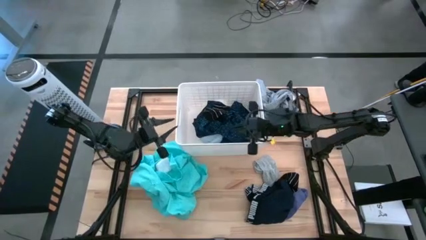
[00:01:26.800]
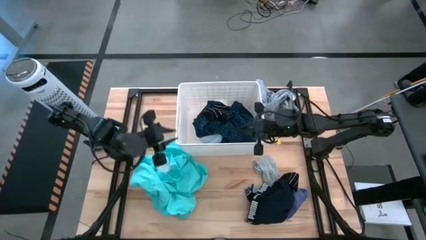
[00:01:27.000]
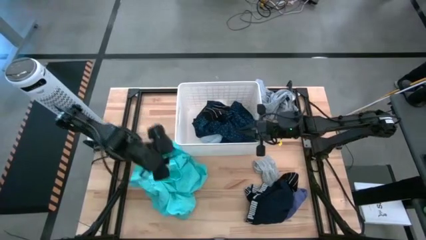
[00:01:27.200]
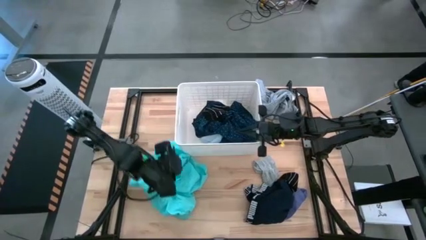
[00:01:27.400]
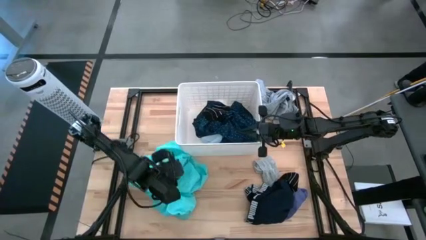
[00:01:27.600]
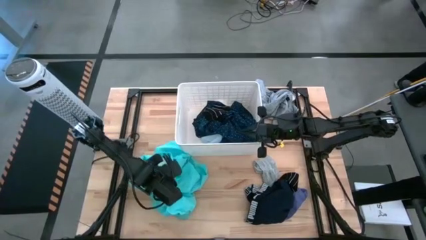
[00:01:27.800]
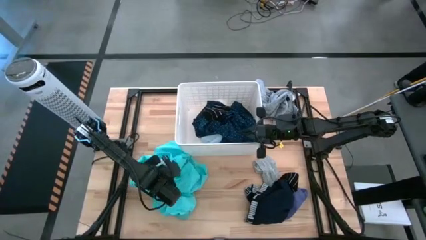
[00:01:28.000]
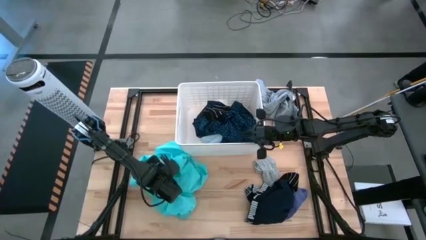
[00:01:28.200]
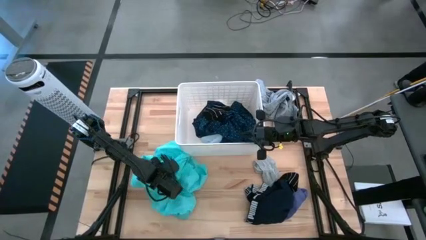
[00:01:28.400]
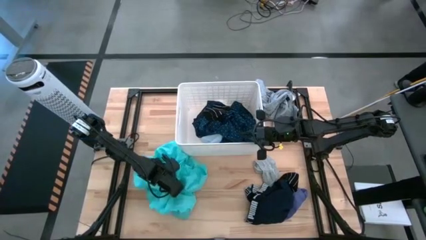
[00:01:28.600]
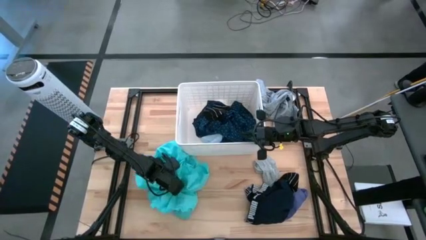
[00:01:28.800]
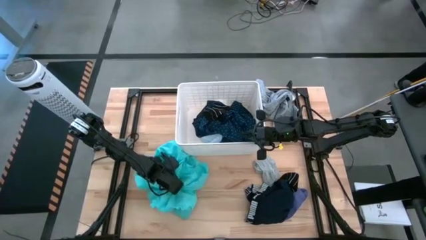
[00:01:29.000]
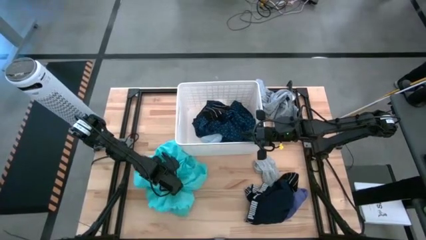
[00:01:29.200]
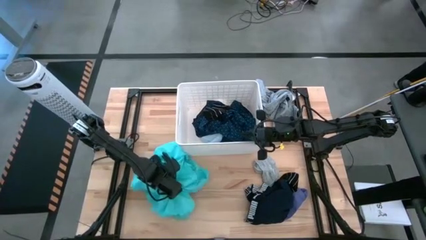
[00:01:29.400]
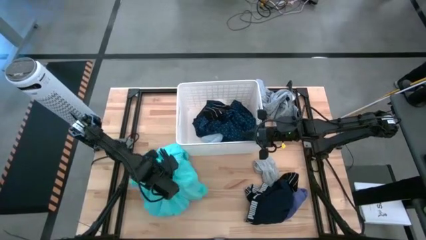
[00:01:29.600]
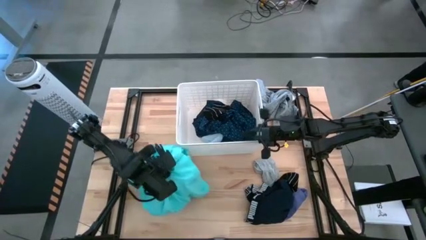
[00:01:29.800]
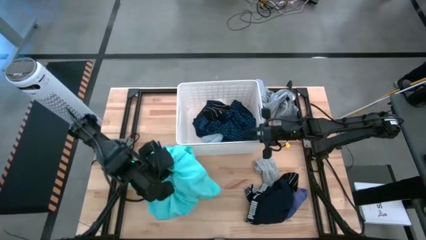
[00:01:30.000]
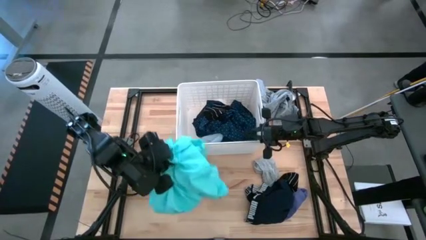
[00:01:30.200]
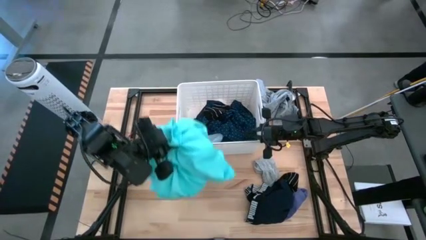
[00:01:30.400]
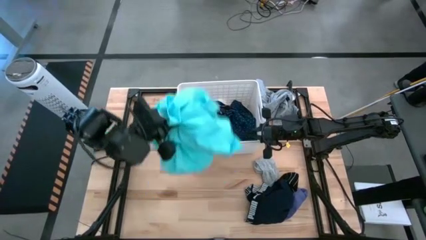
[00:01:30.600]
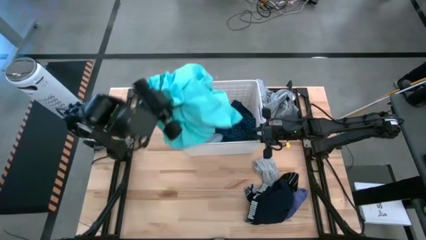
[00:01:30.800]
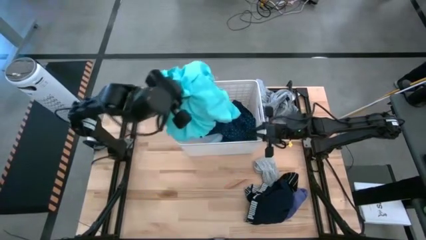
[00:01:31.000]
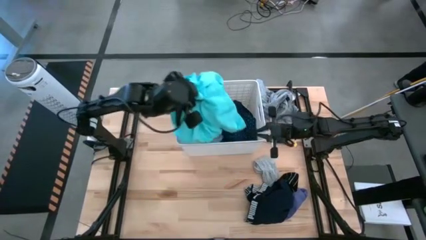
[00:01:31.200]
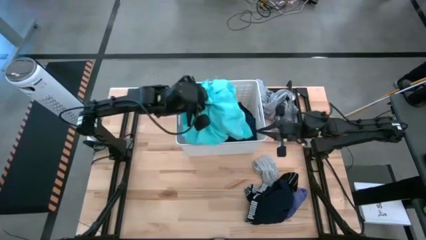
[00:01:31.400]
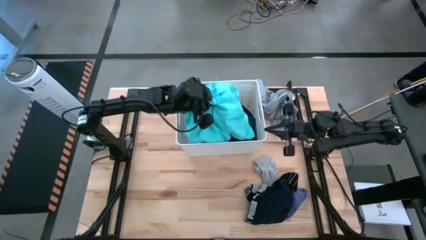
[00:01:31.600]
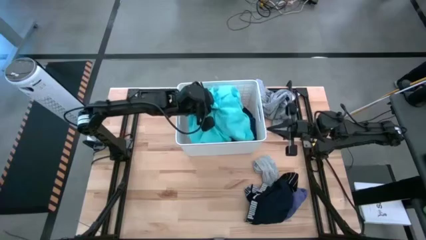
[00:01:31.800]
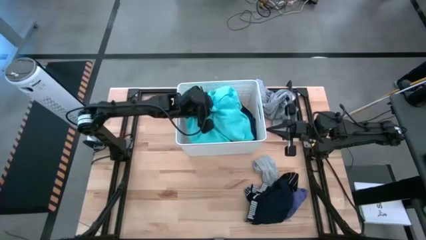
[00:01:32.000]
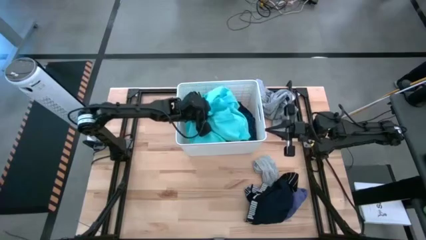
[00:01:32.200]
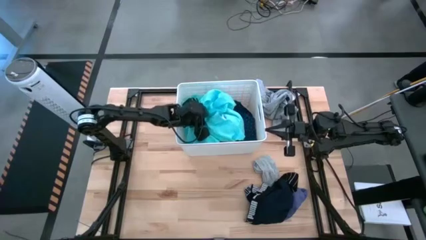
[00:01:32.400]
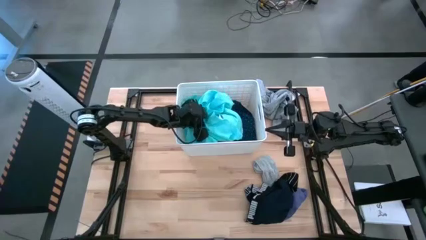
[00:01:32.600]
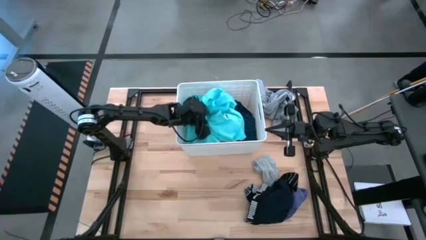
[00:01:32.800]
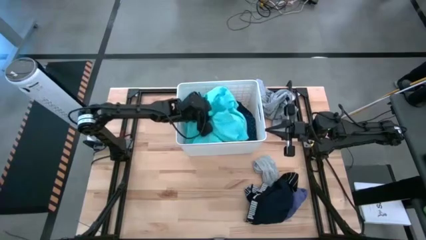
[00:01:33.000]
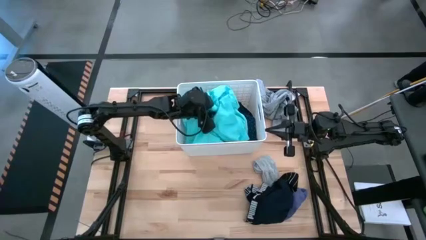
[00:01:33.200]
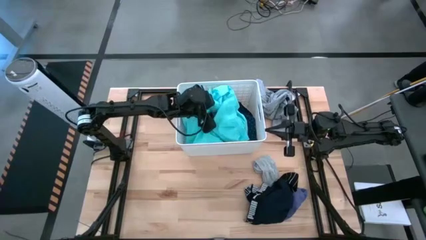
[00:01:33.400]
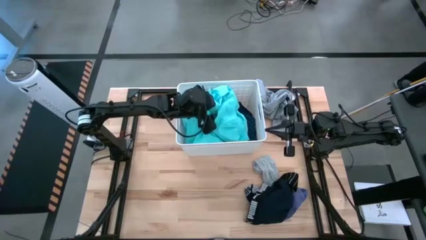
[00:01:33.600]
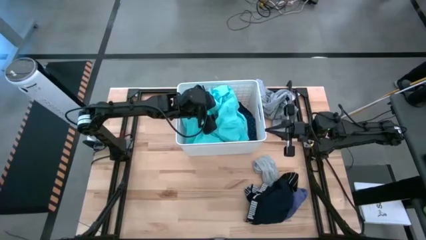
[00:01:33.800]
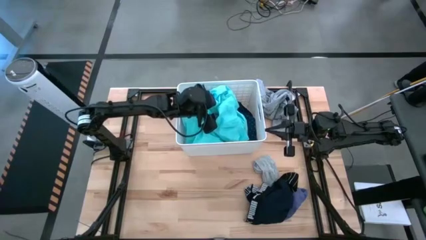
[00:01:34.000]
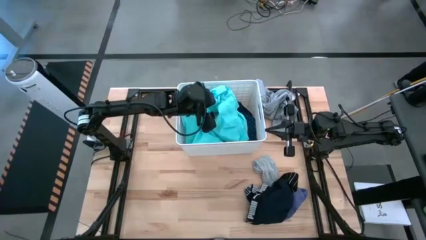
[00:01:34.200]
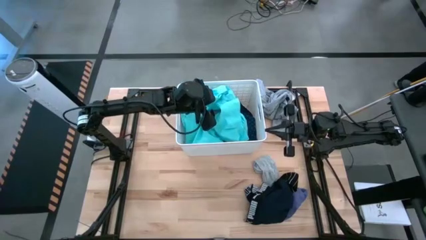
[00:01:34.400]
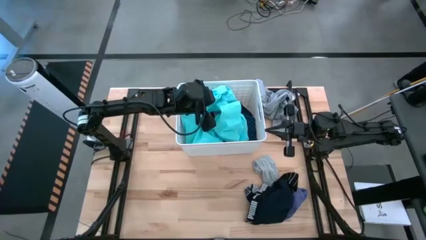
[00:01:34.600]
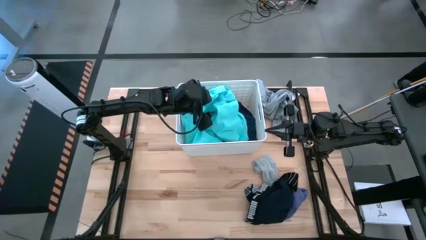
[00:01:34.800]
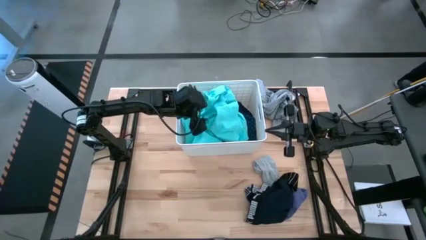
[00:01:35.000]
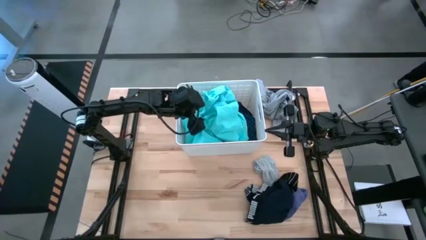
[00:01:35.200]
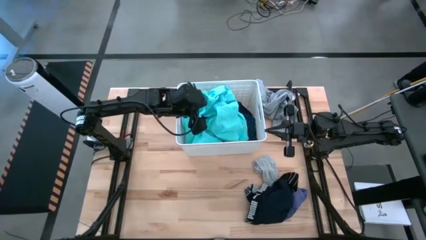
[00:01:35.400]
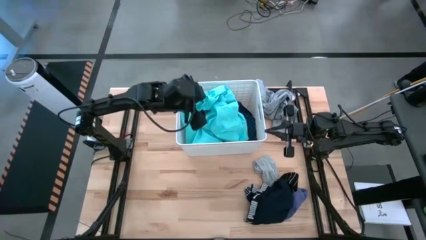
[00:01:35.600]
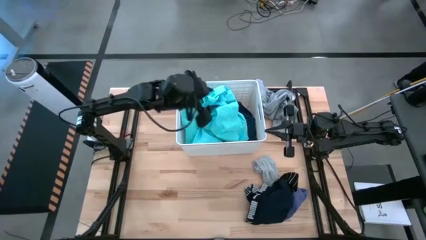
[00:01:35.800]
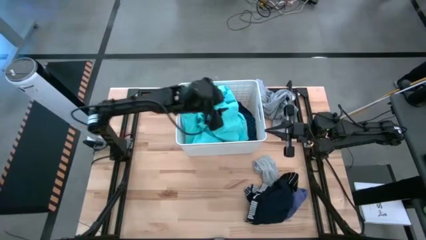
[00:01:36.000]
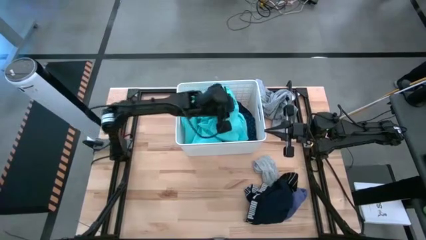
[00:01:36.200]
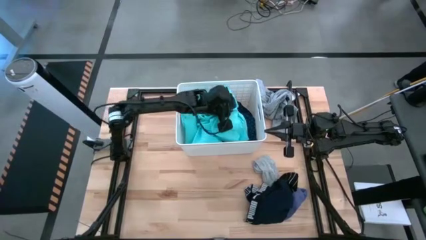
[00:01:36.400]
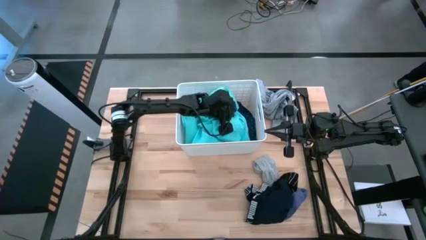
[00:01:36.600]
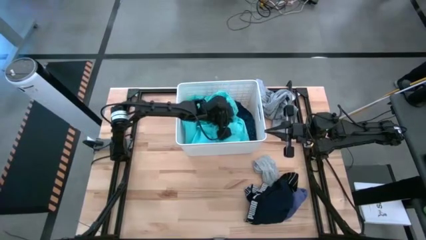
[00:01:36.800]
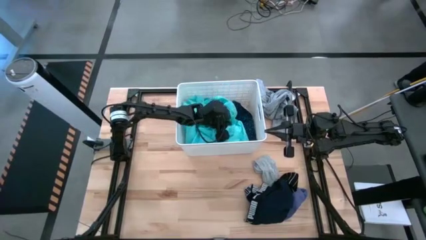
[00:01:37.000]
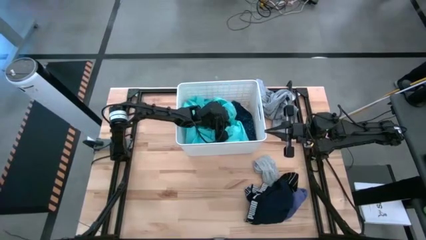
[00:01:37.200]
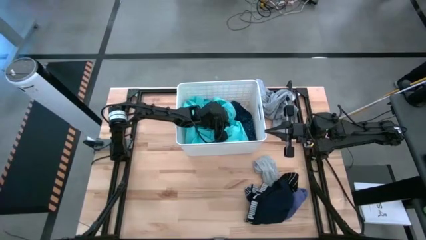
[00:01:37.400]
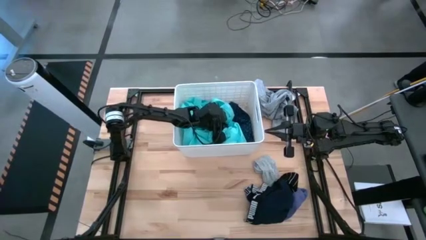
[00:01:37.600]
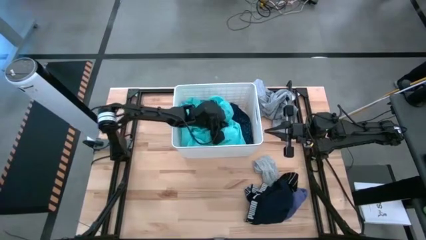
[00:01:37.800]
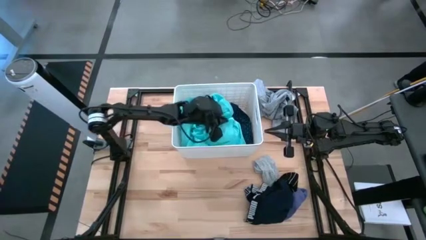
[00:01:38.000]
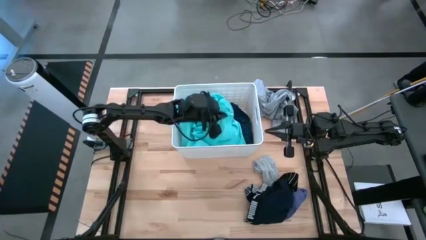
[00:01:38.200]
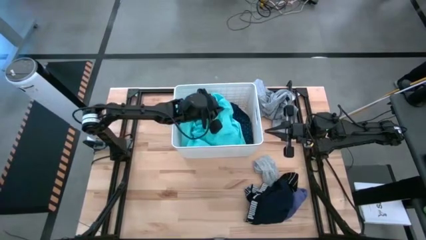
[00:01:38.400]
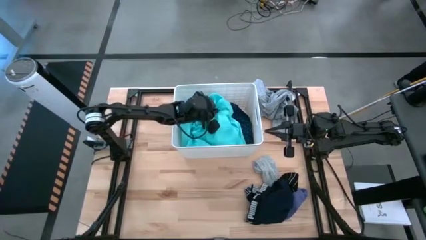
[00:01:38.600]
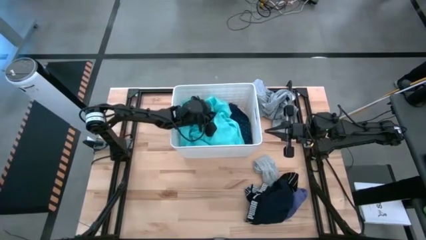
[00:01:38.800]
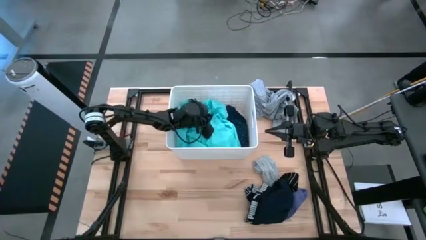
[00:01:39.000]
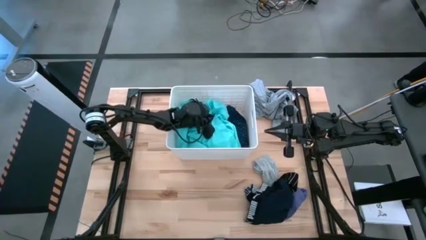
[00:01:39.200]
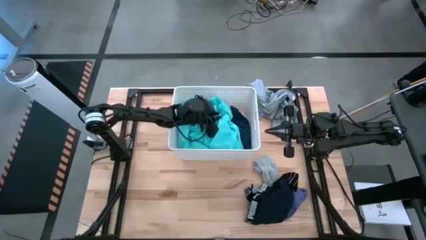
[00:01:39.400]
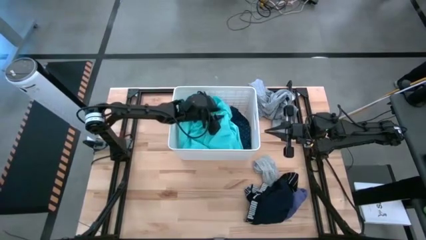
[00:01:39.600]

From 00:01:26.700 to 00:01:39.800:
Task: Sort clothes
Put the light blue shorts into the white laundry bin

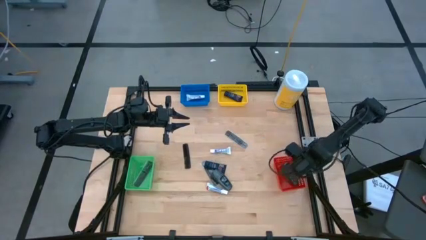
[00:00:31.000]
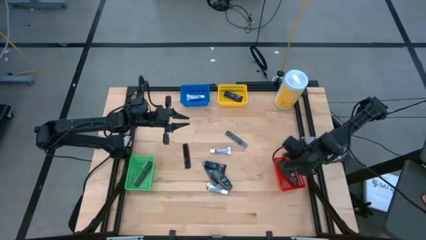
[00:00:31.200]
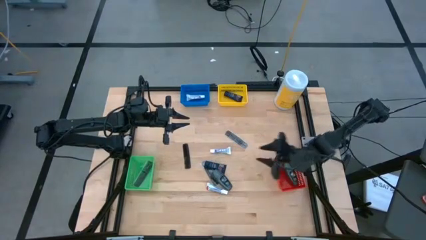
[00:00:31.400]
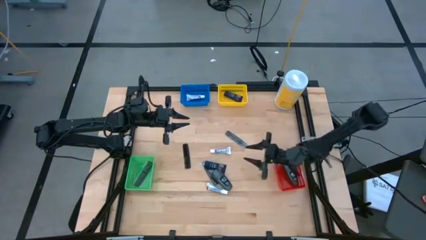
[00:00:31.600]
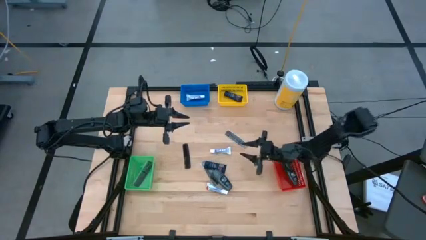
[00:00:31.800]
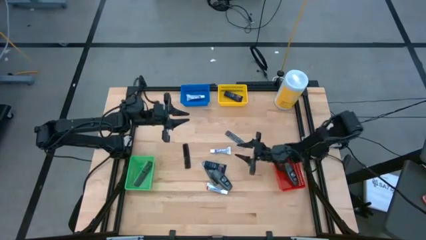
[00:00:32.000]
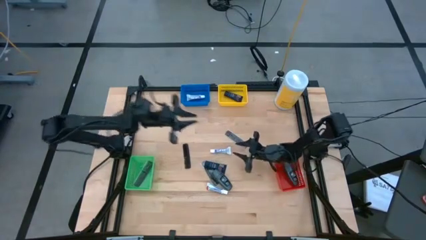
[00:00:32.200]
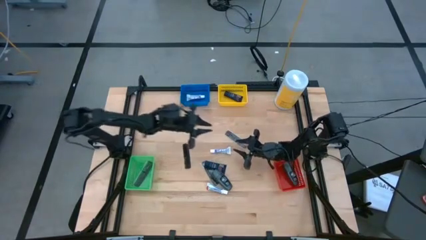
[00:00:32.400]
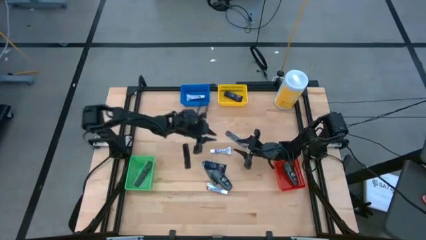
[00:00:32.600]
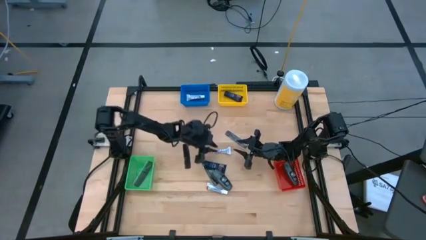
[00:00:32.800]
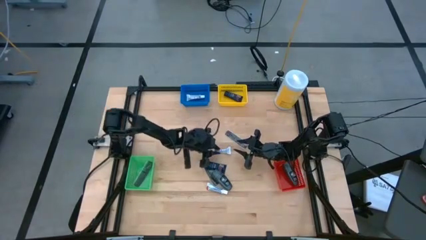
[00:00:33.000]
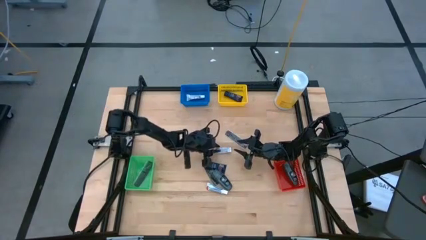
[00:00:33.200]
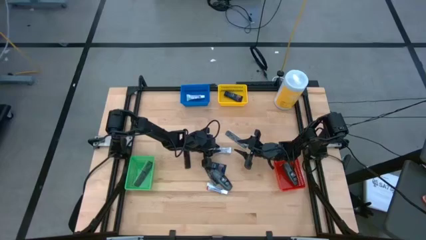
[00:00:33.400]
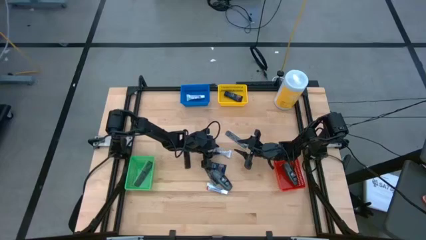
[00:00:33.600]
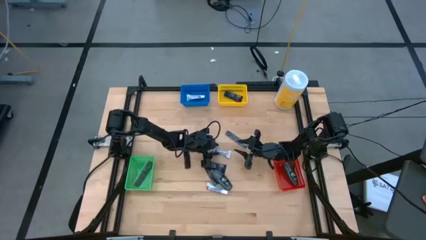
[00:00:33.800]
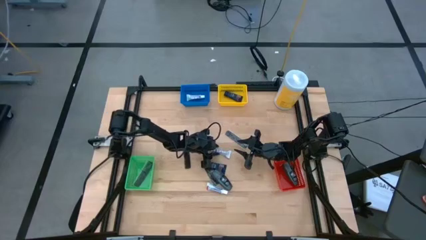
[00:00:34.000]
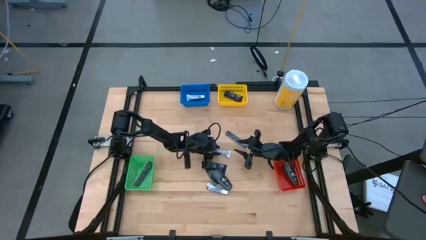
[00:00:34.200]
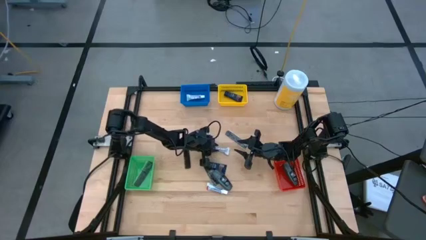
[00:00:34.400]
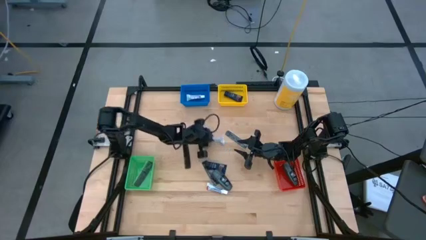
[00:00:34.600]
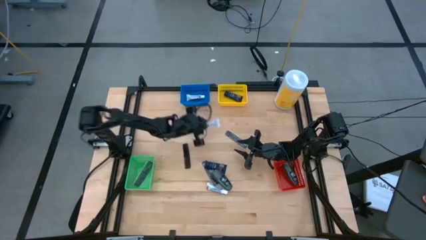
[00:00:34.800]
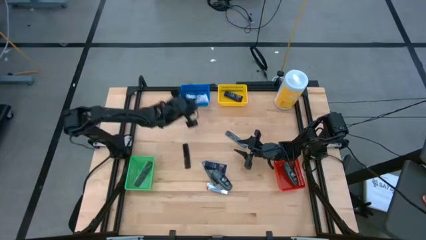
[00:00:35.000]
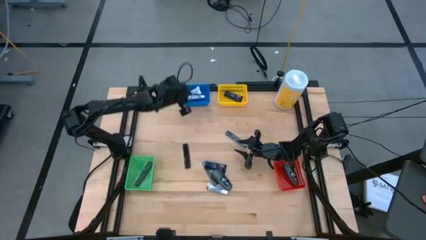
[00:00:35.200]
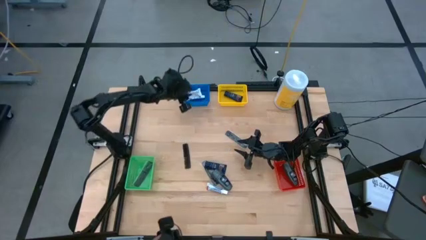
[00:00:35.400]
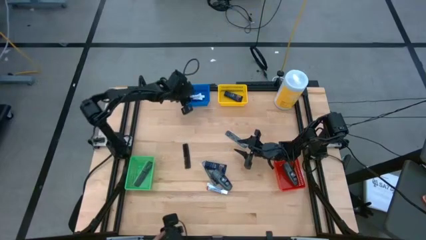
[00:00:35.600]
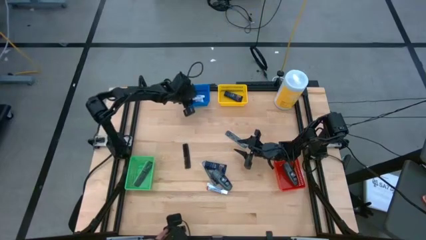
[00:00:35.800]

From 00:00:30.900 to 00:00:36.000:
Task: Pick & Place Travel size toiletries
Put the white toothpaste into the blue bin
